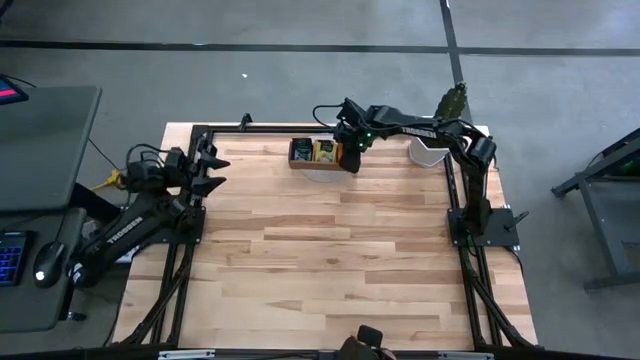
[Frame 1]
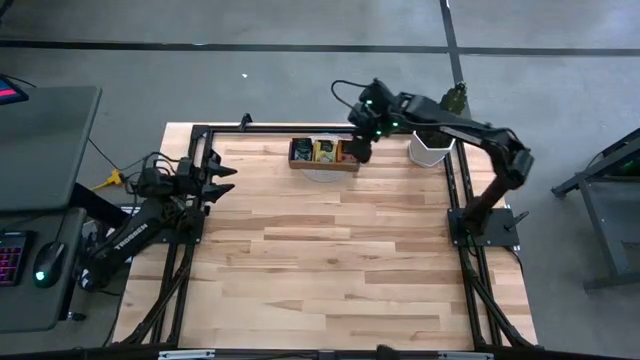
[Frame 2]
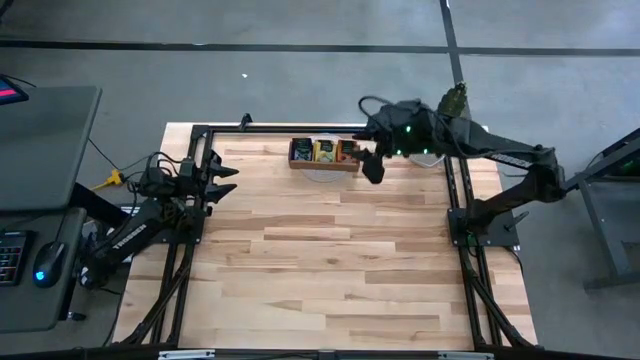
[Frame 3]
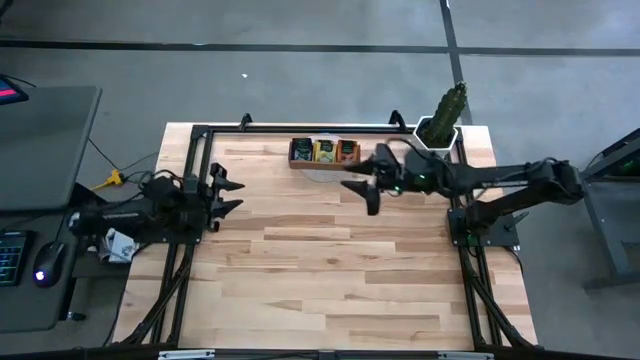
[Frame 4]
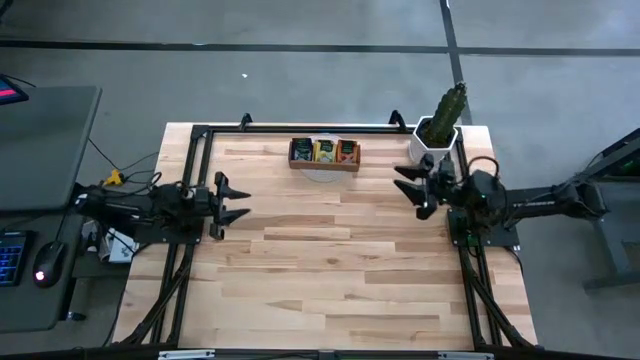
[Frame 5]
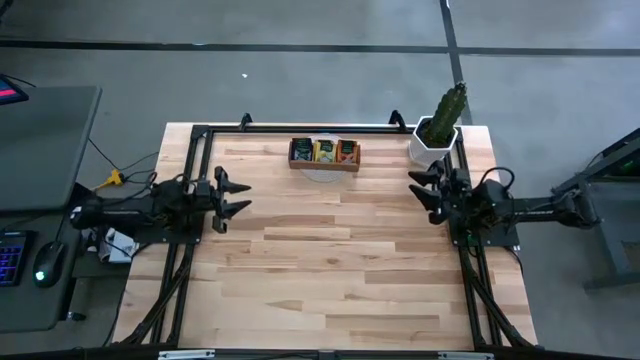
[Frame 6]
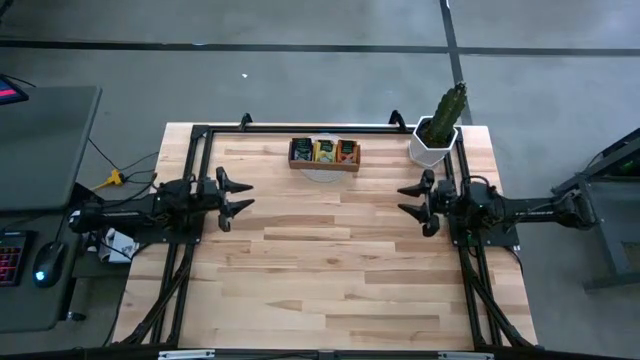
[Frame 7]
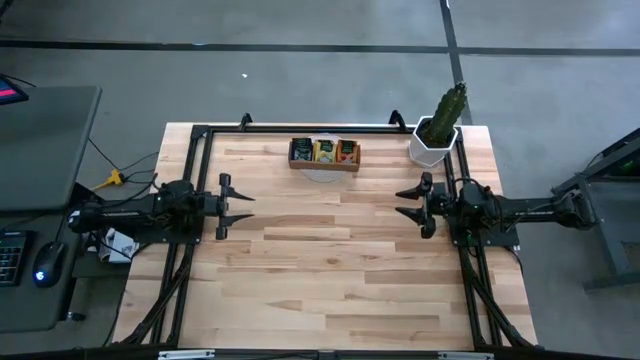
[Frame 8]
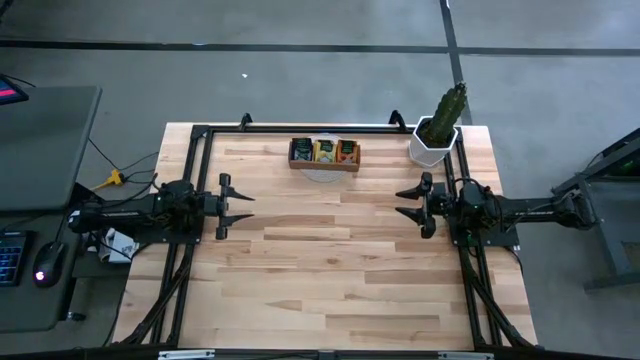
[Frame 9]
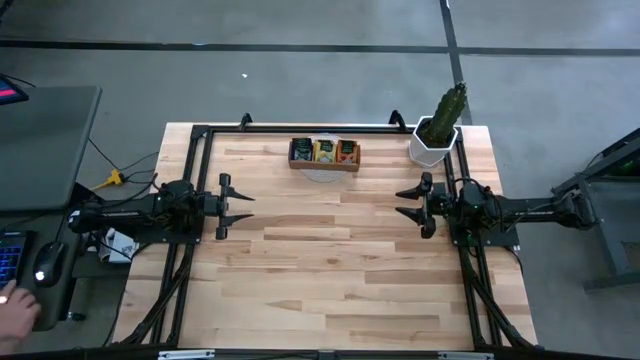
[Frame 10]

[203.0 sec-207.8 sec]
Task: Pick & Place Tea
Return to Home Position

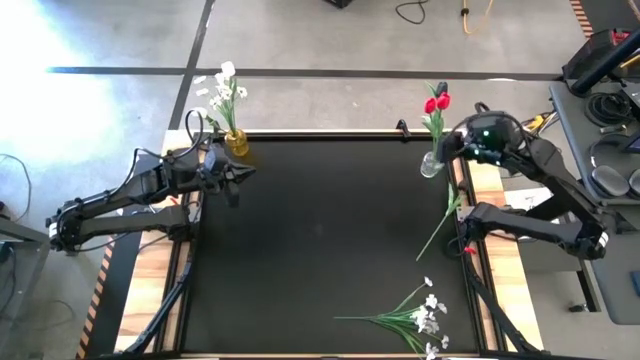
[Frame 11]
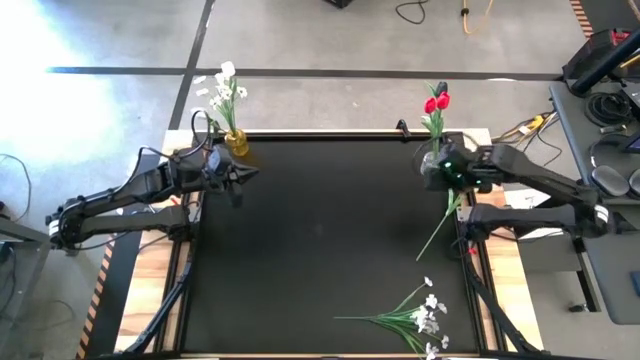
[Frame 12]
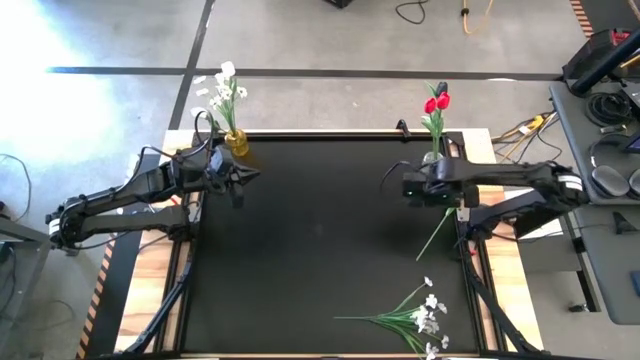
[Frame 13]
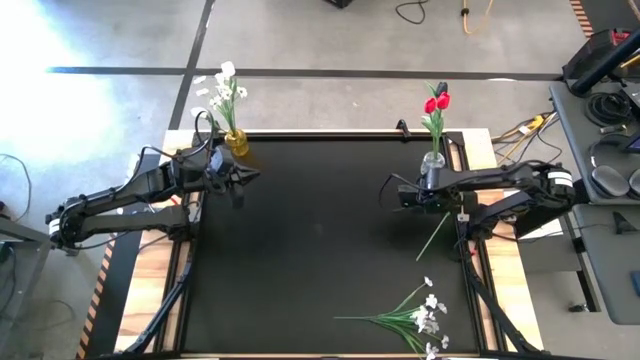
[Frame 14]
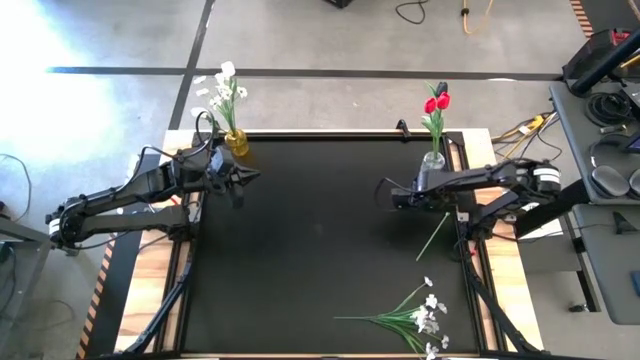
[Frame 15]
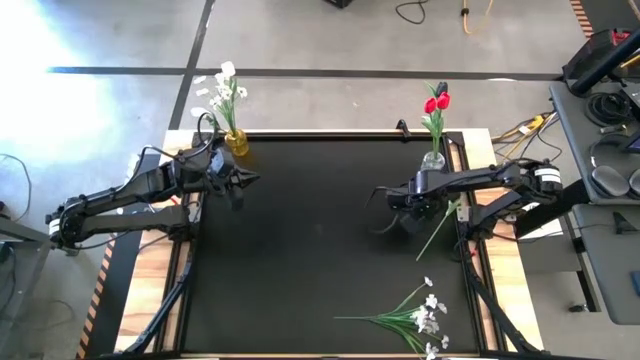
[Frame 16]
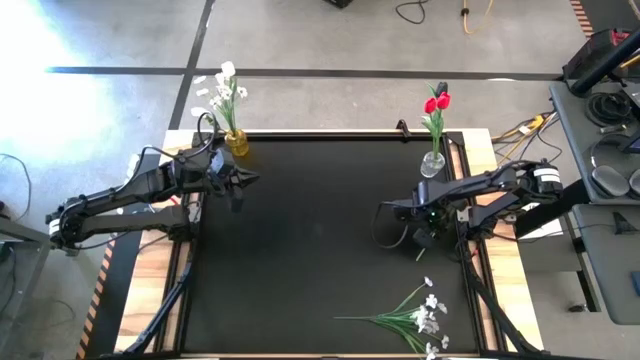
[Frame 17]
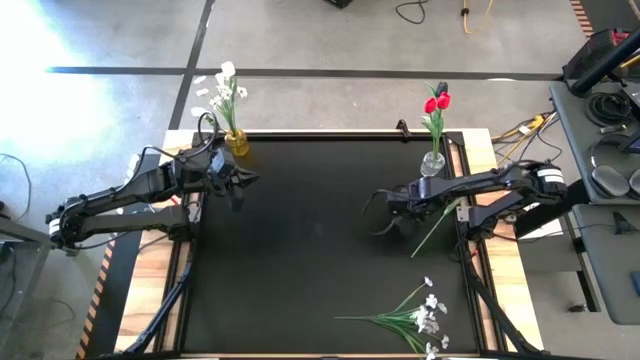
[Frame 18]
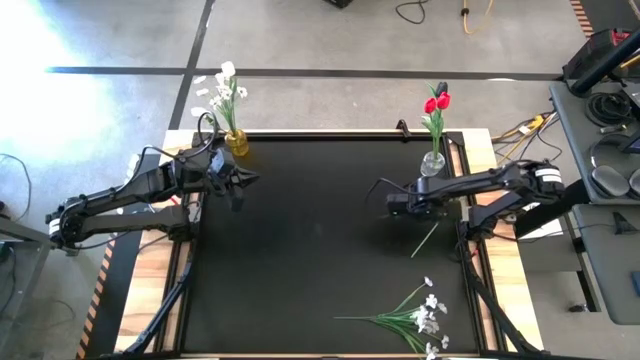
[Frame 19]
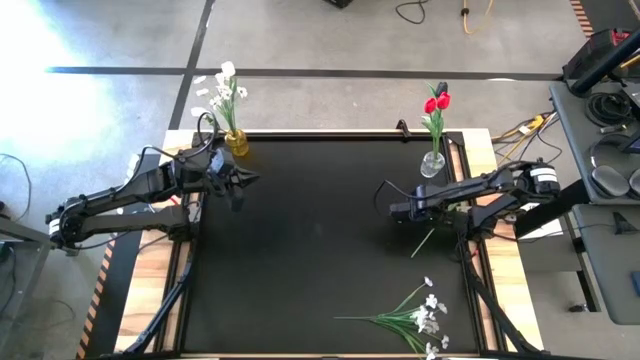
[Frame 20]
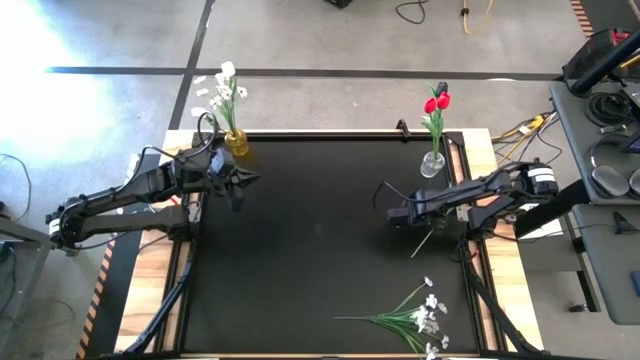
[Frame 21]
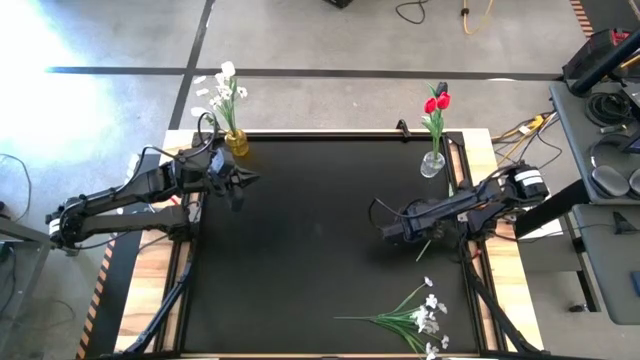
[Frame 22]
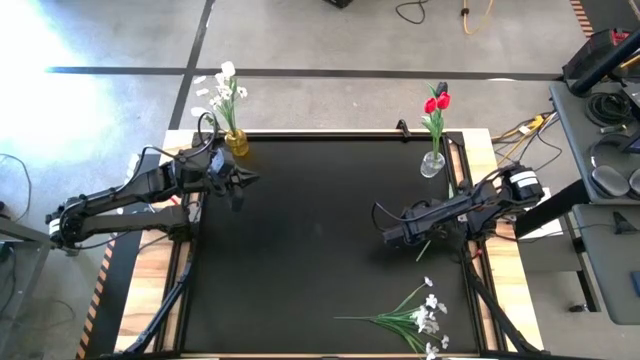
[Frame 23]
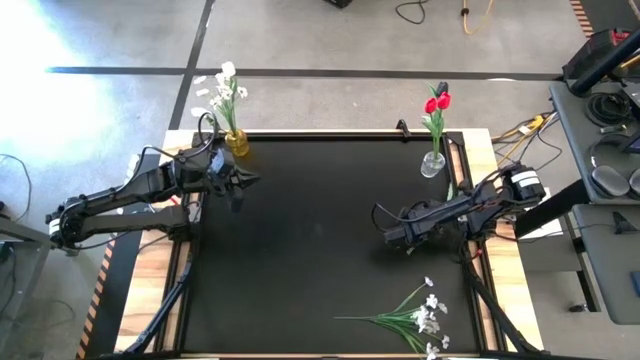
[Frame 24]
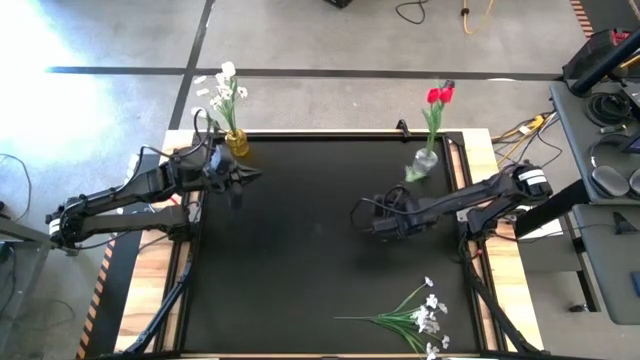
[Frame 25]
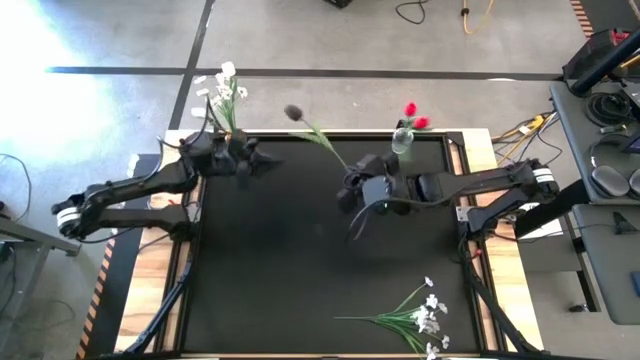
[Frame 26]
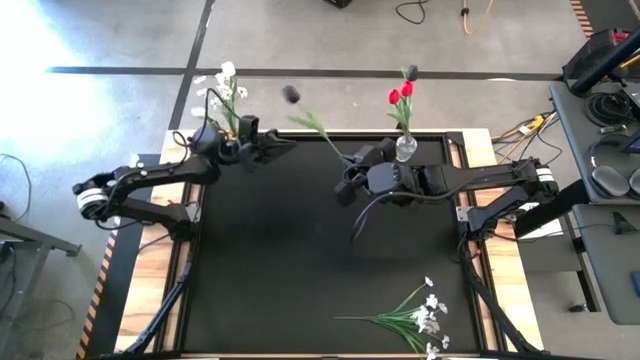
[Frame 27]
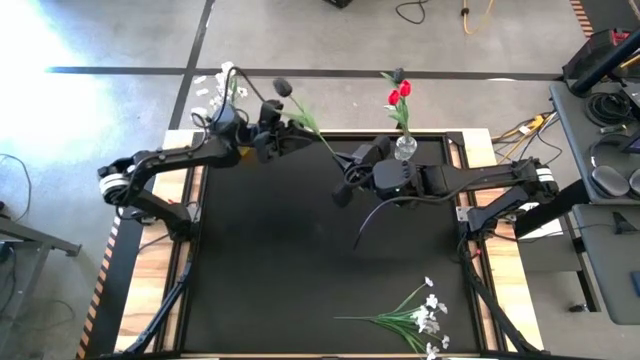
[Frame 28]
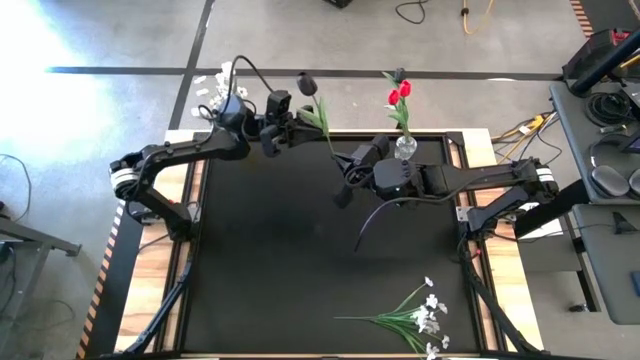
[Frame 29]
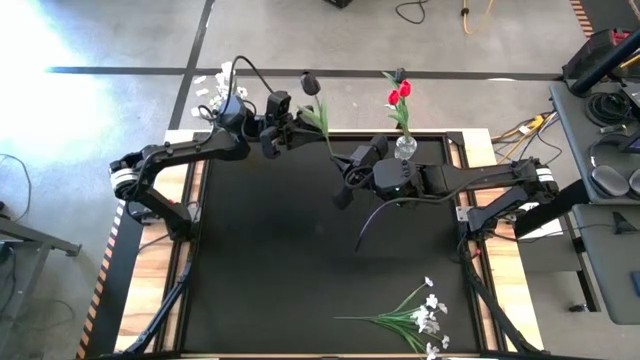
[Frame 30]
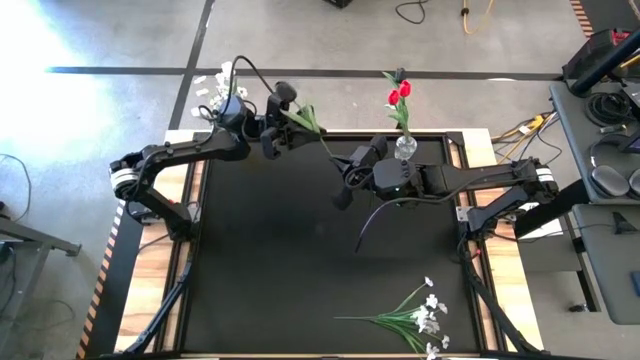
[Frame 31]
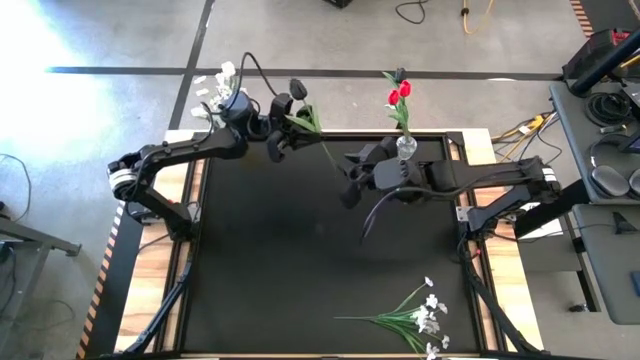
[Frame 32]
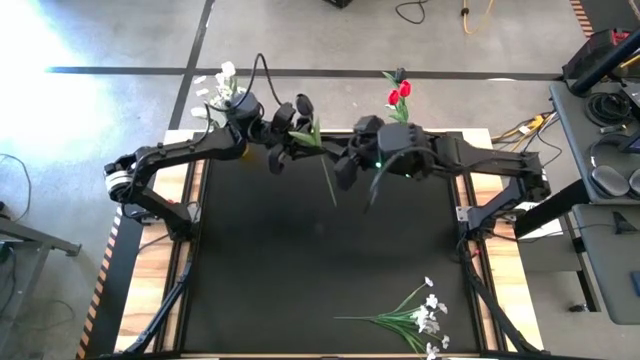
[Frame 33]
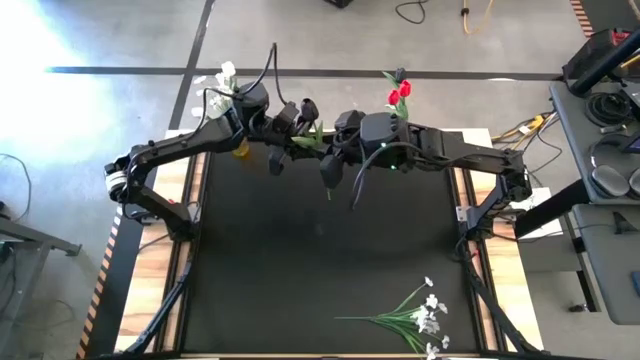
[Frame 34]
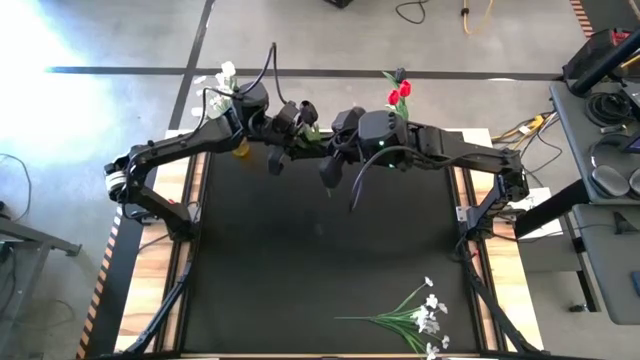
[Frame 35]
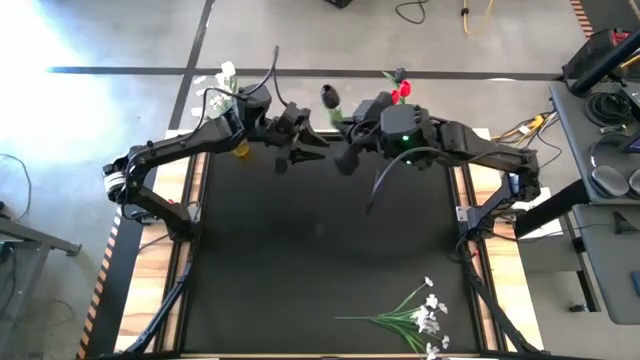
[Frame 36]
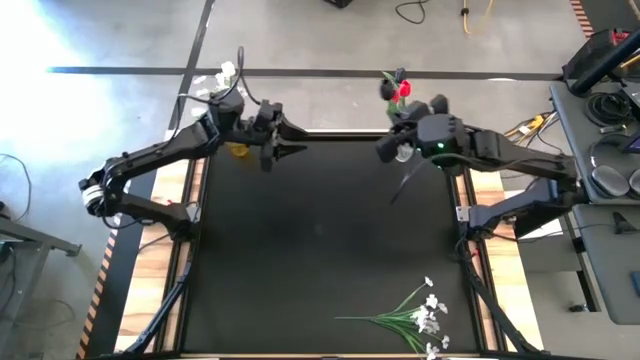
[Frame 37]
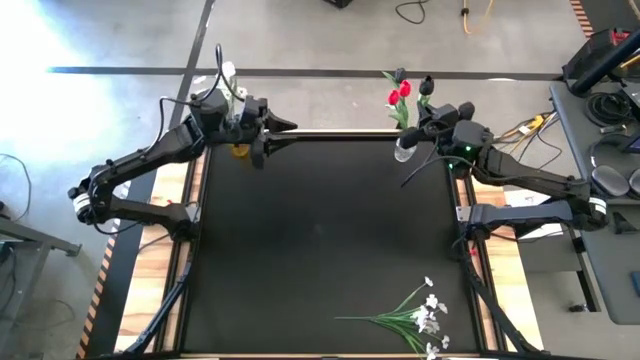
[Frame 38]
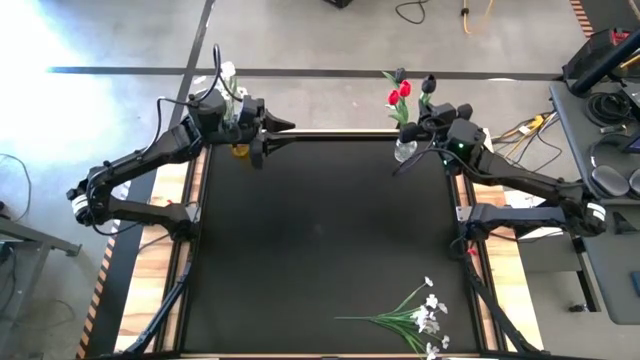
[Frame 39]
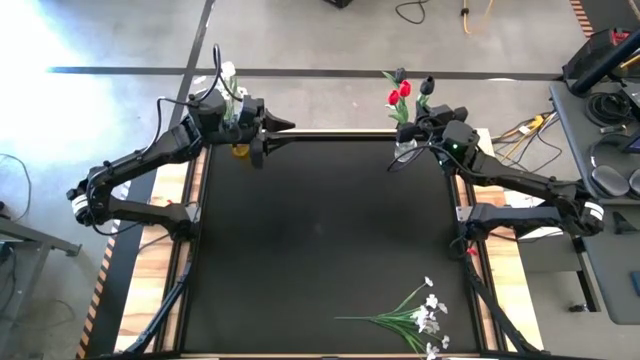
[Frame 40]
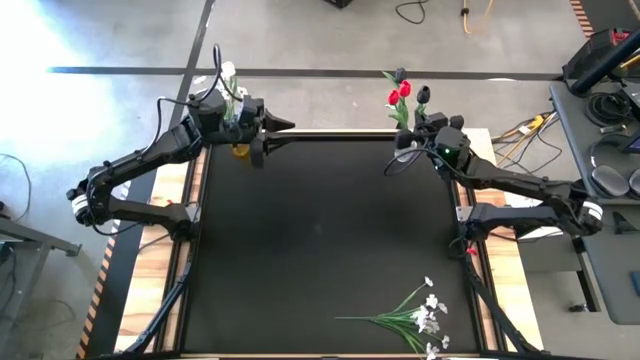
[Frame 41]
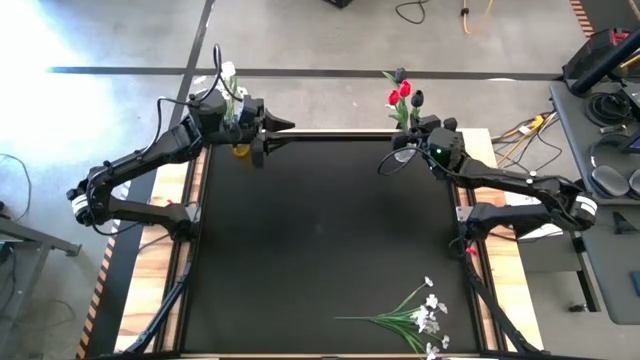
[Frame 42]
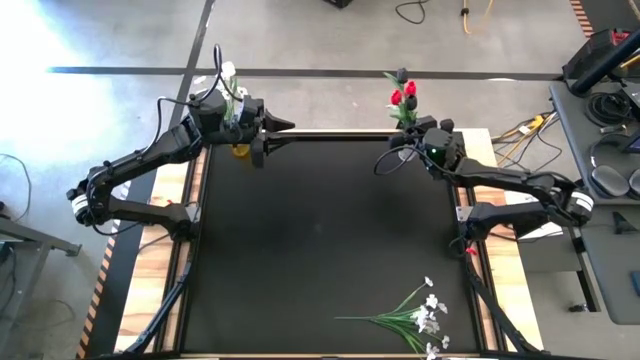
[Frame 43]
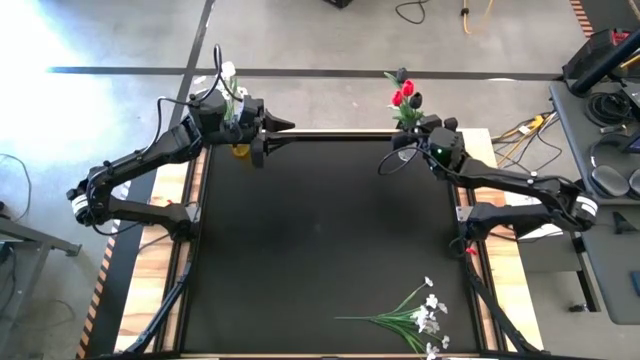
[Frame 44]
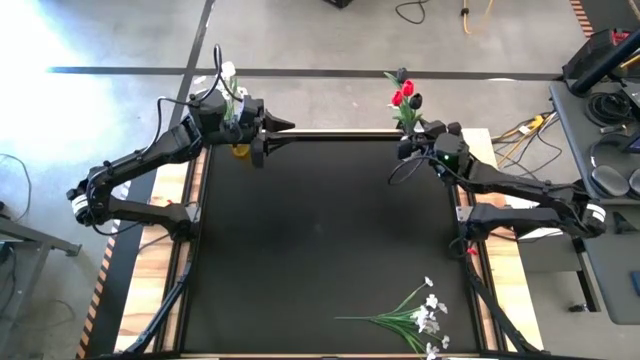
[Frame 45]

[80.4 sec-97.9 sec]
Task: Sort flowers into vase by color
Put the black tulip into the transparent vase
